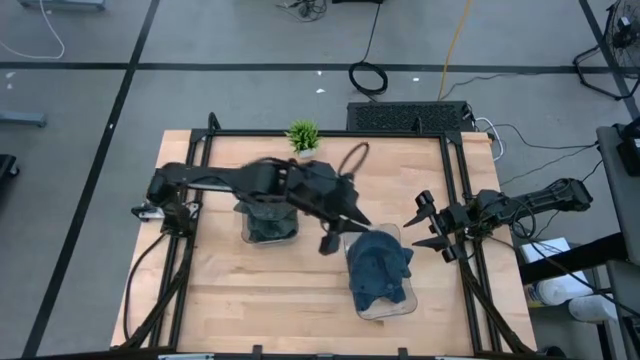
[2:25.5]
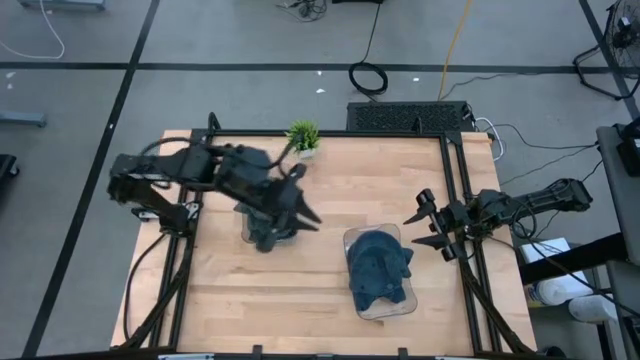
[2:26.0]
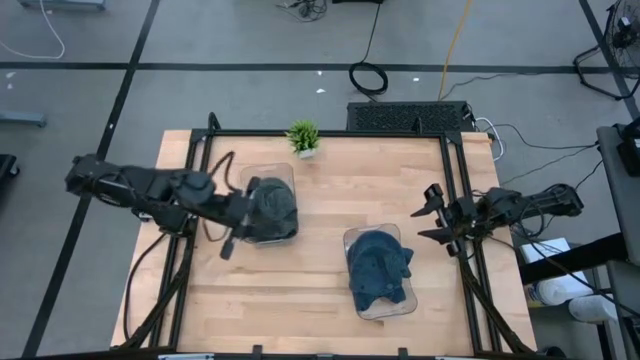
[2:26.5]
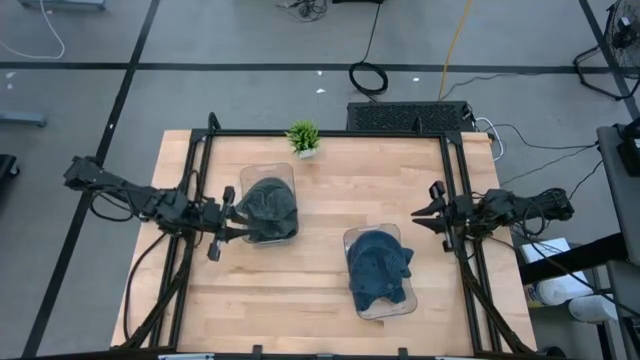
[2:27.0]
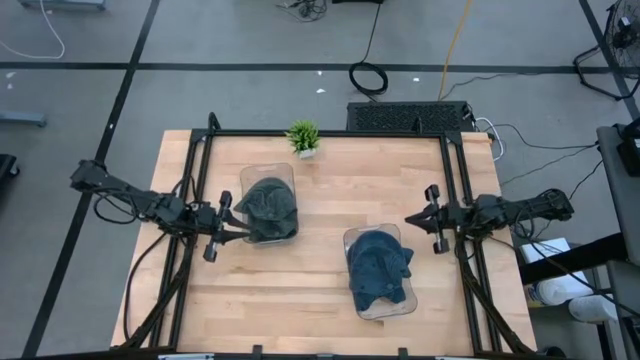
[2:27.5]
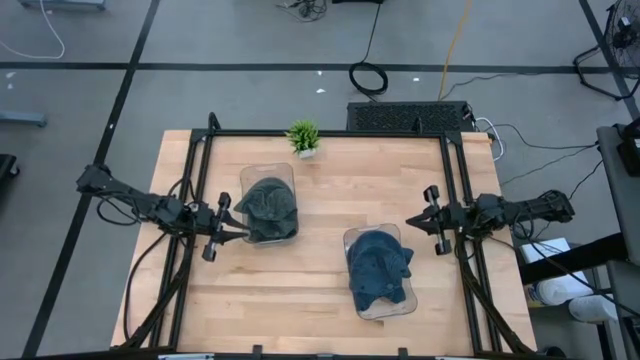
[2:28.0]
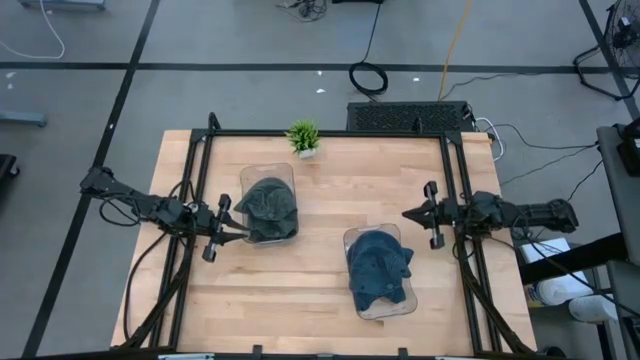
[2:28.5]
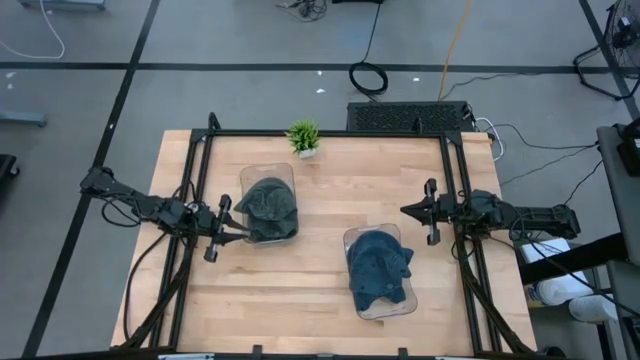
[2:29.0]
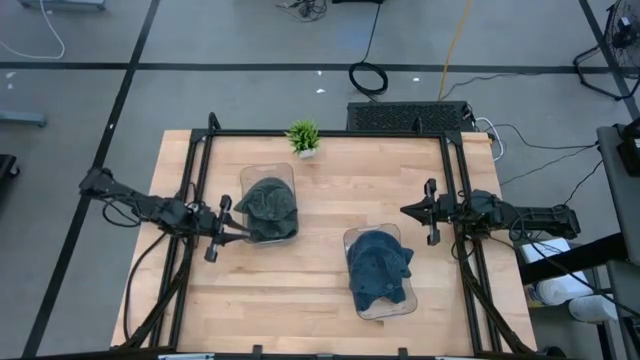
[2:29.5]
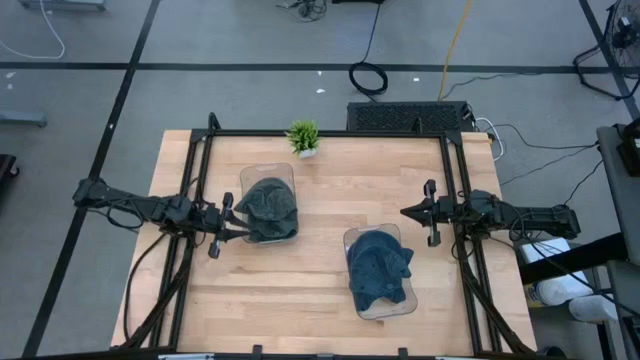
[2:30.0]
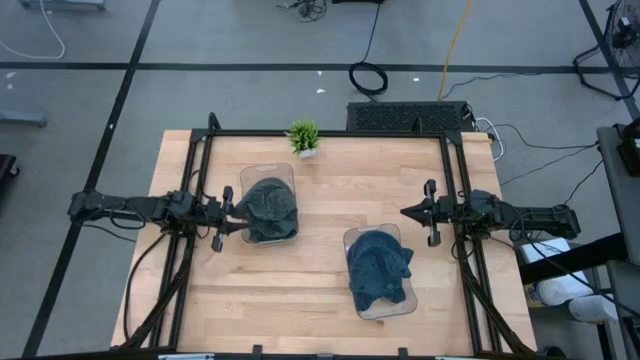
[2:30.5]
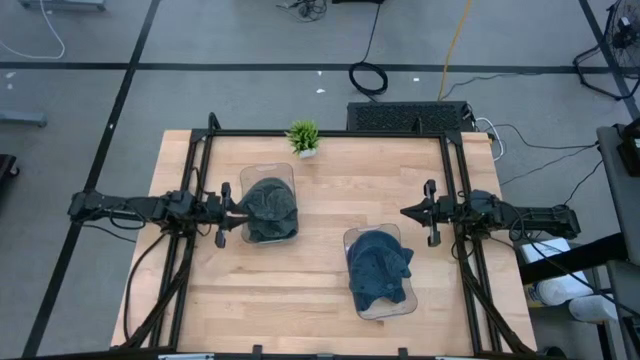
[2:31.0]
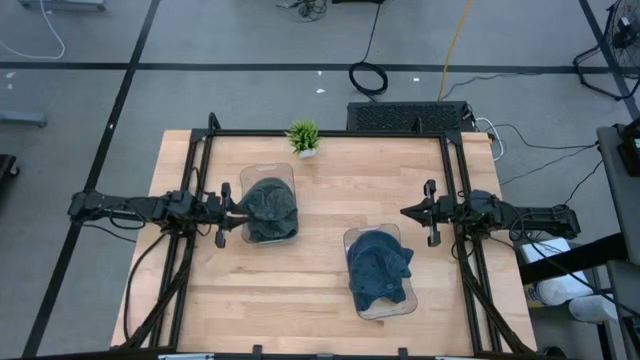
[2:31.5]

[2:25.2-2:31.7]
Task: Pick & Place hat
Return to Home Position

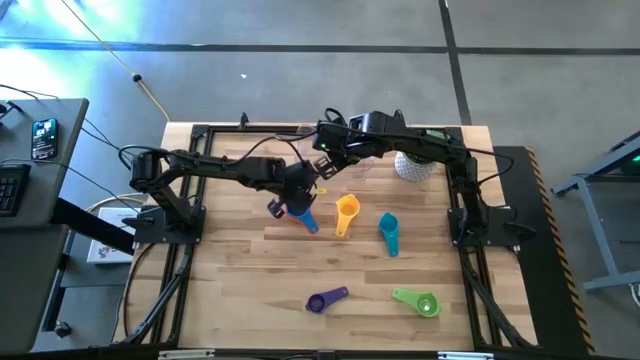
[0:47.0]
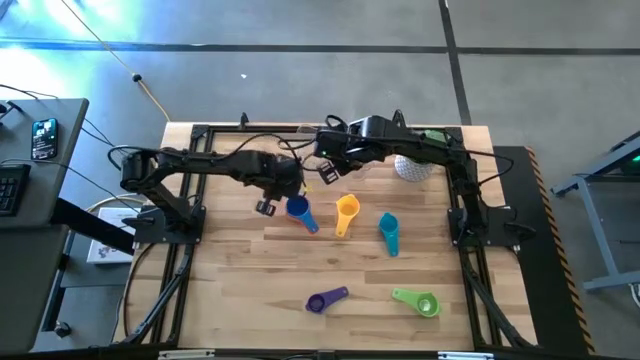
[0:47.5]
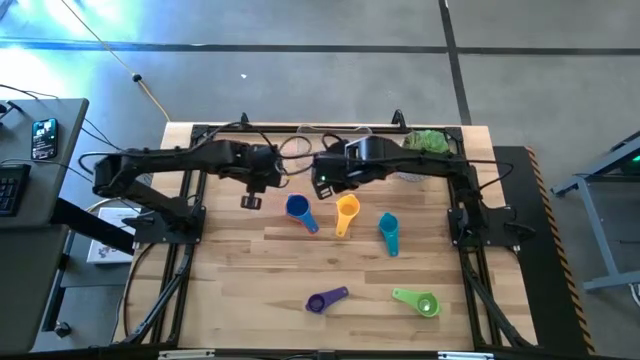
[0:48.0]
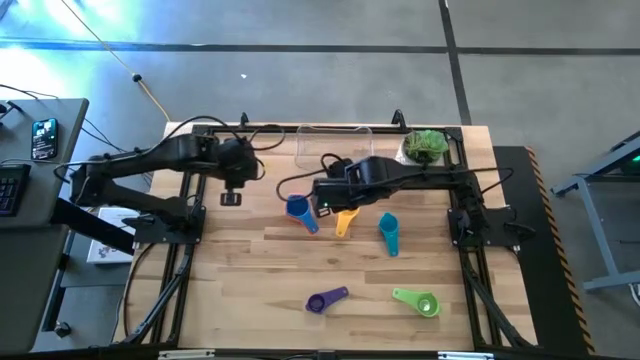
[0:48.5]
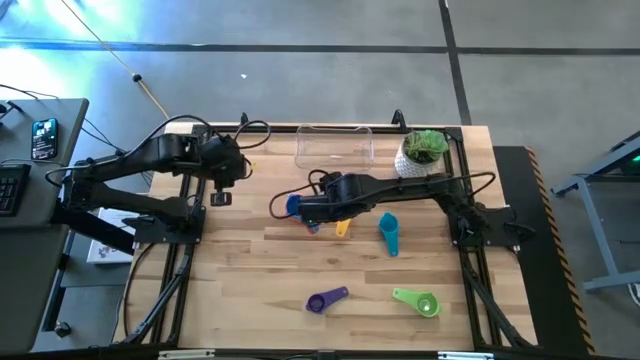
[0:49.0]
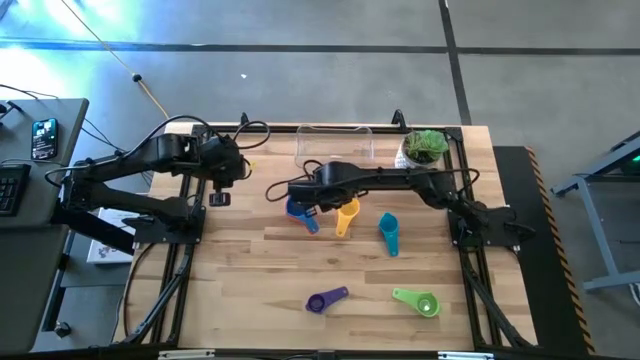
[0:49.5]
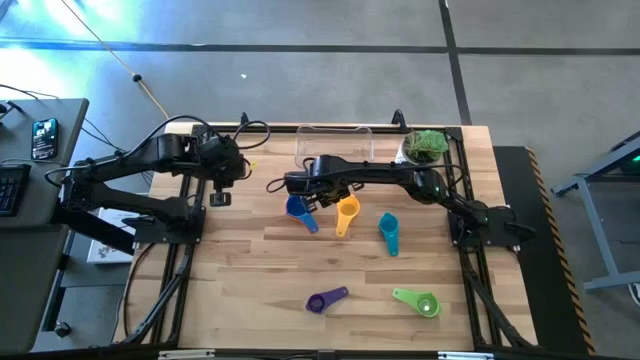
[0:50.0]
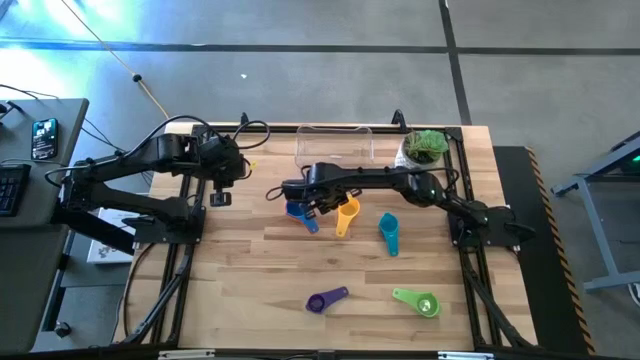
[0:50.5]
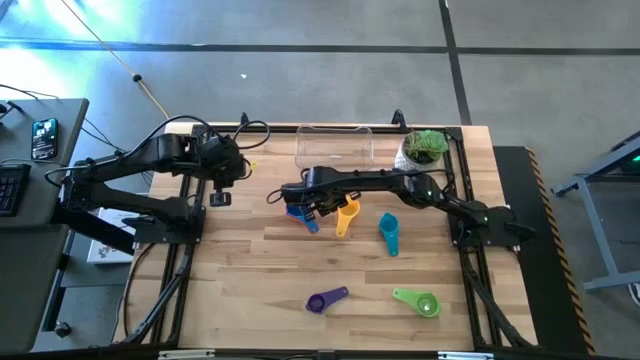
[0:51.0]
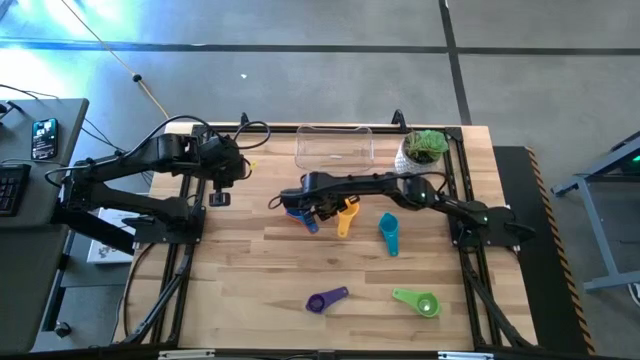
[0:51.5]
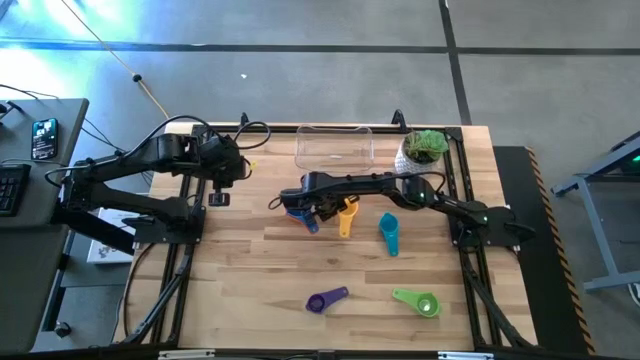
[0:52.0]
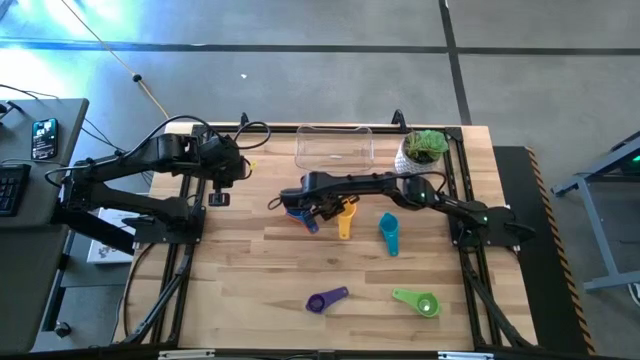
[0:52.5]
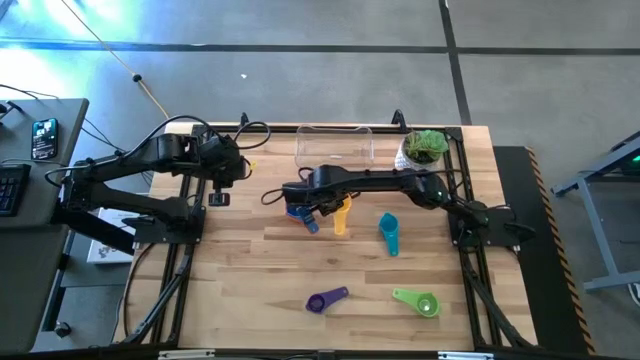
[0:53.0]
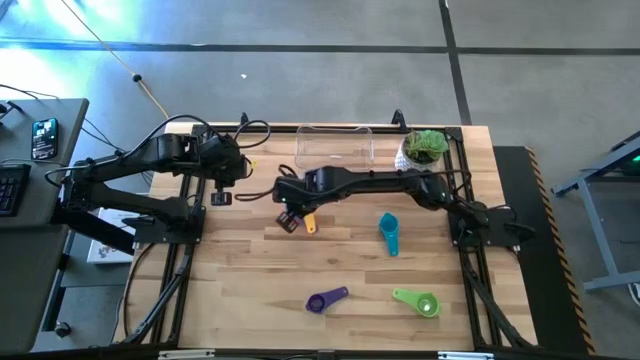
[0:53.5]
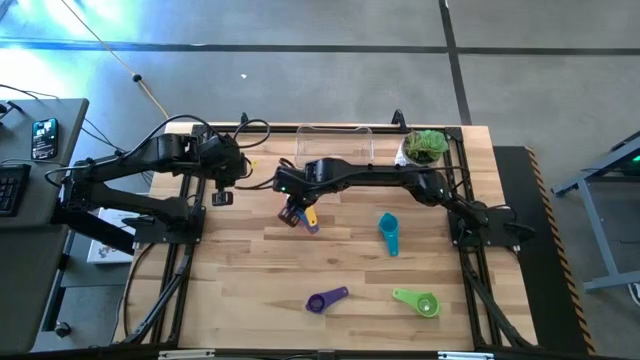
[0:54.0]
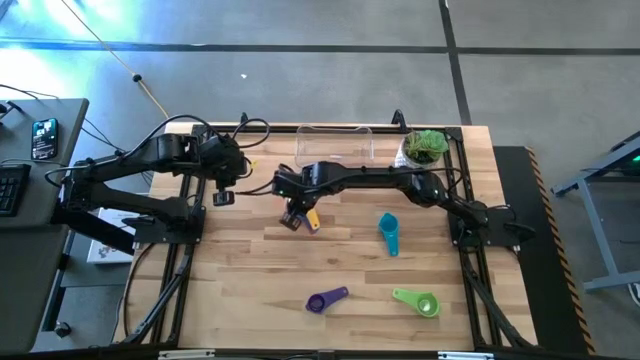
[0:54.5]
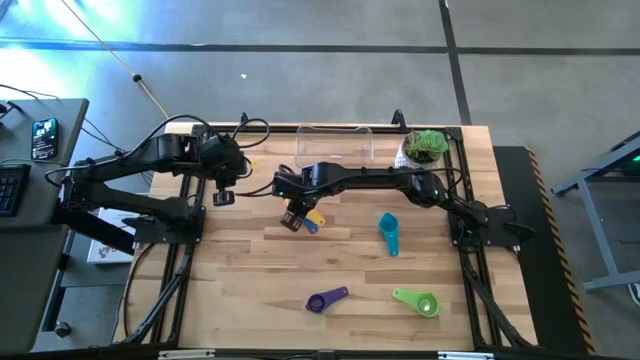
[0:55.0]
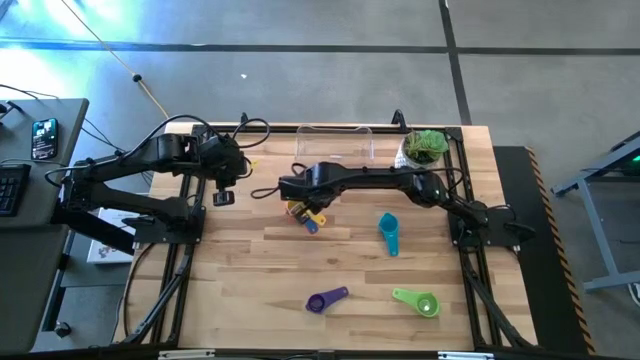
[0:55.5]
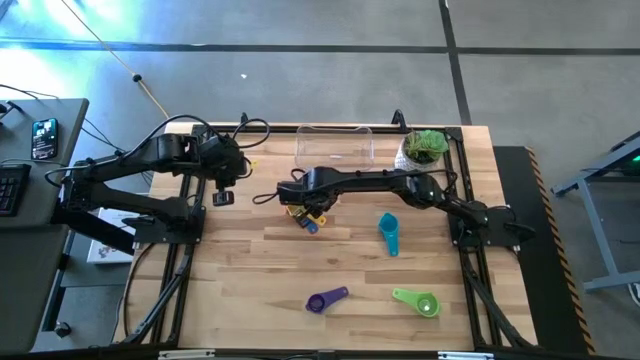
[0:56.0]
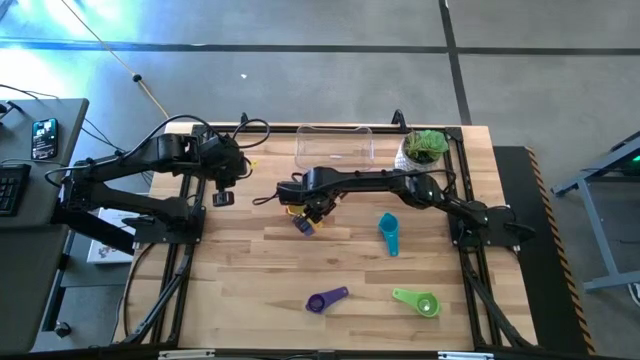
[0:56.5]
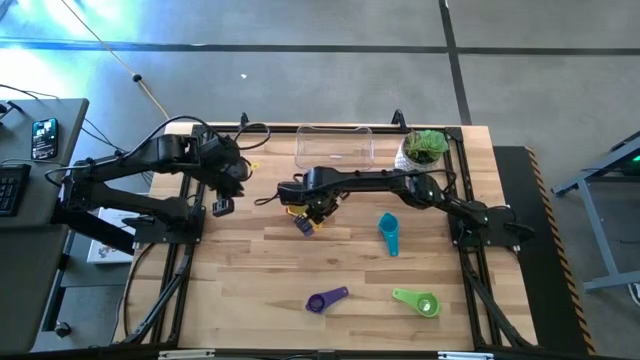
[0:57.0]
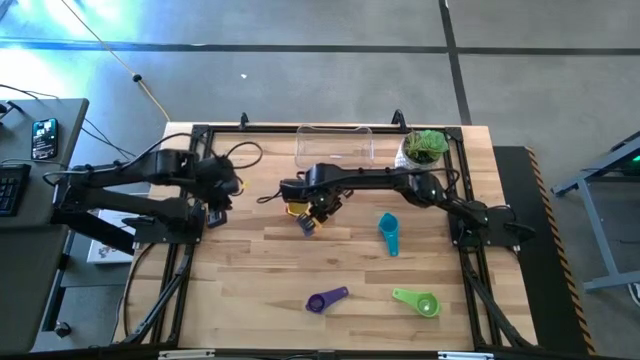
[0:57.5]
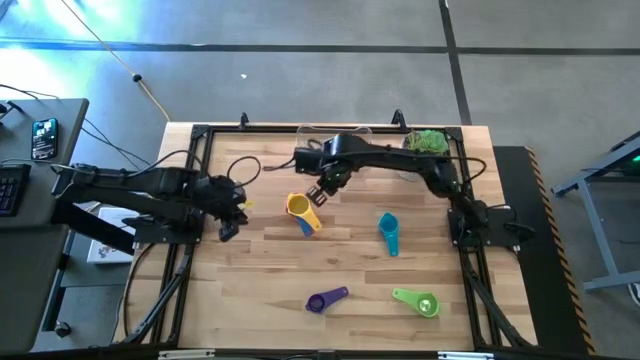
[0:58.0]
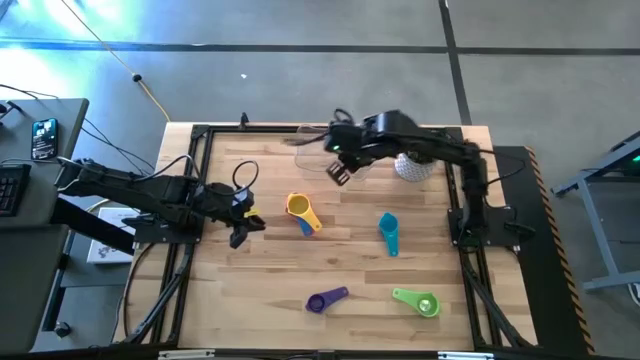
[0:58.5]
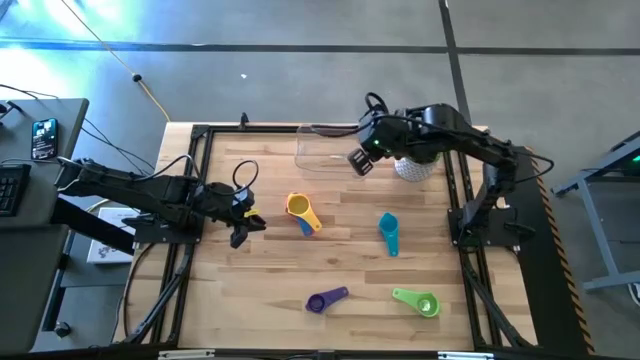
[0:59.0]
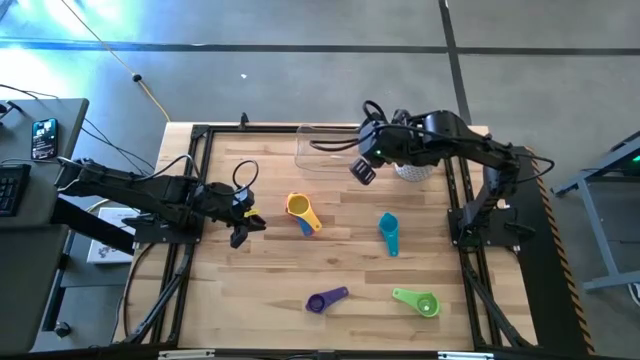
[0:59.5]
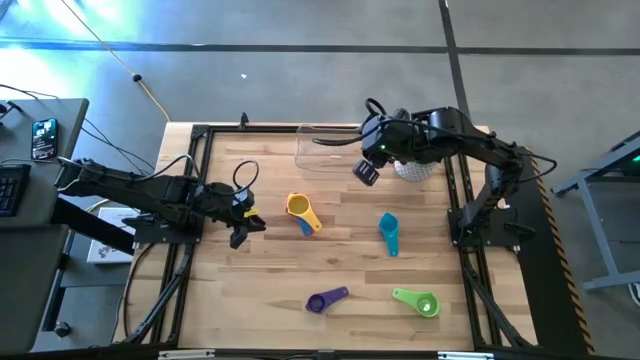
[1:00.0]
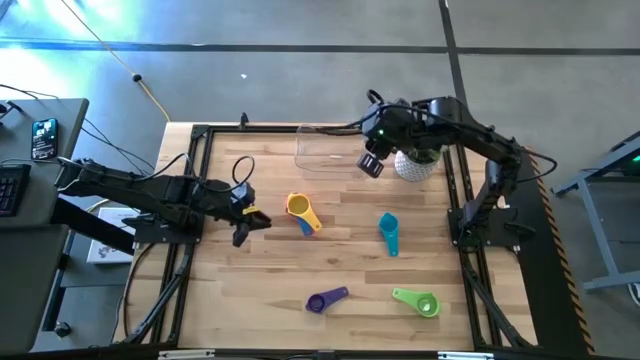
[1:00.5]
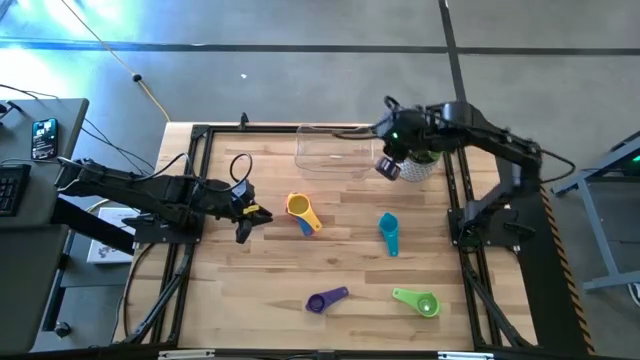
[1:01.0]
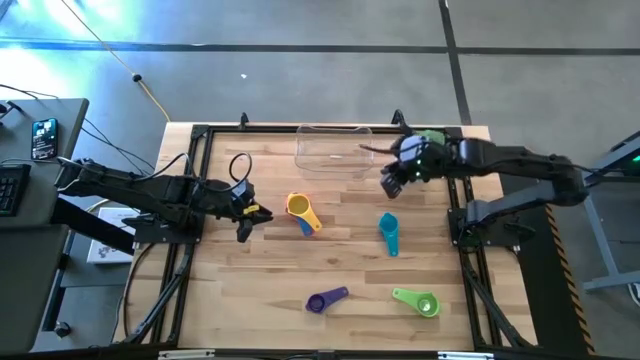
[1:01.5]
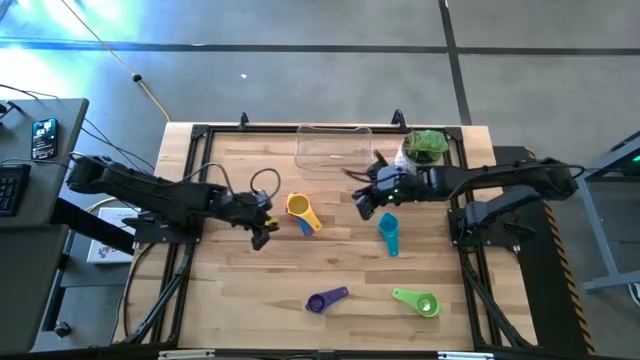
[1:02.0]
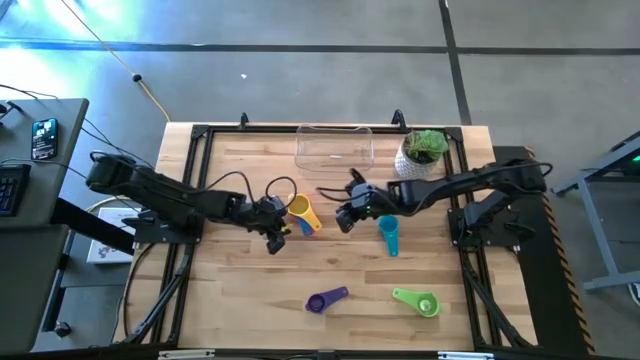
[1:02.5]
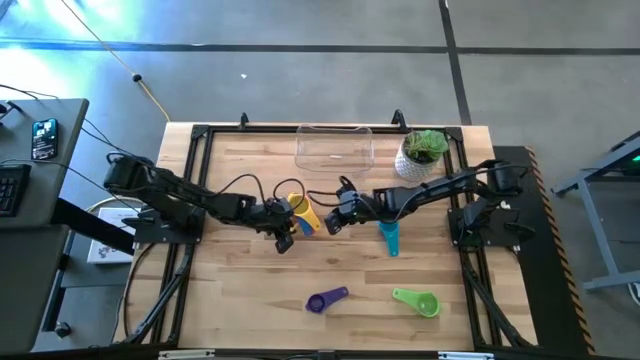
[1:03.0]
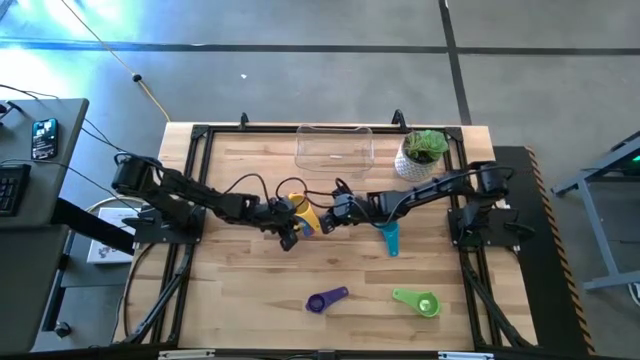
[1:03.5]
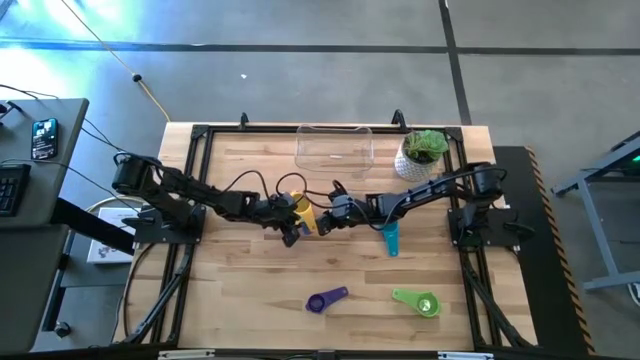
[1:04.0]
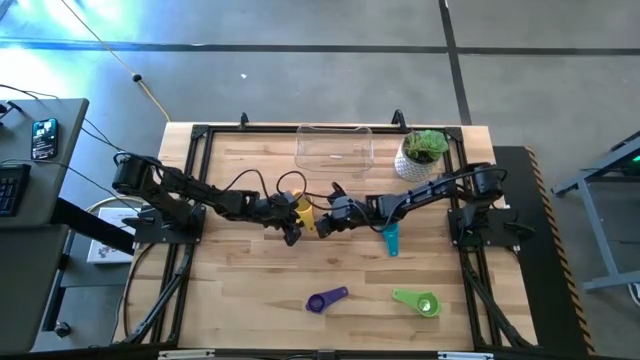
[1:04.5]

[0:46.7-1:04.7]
Task: Nest measuring cups in basket
Stack the yellow measuring cup on the top of the blue measuring cup
